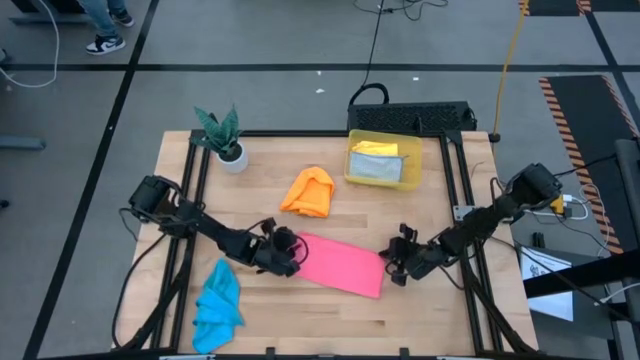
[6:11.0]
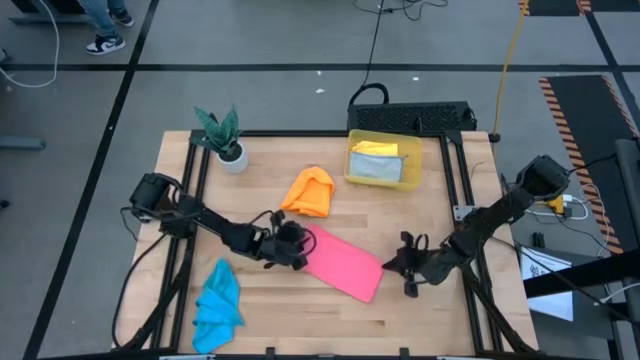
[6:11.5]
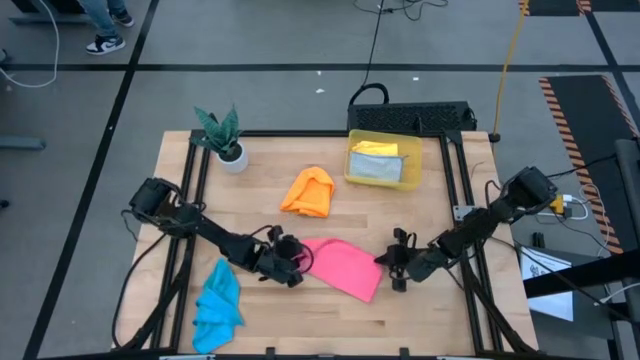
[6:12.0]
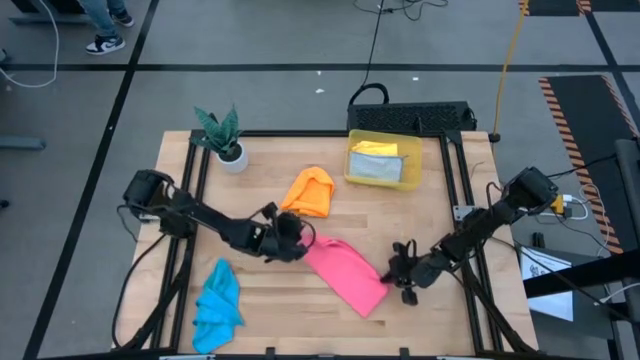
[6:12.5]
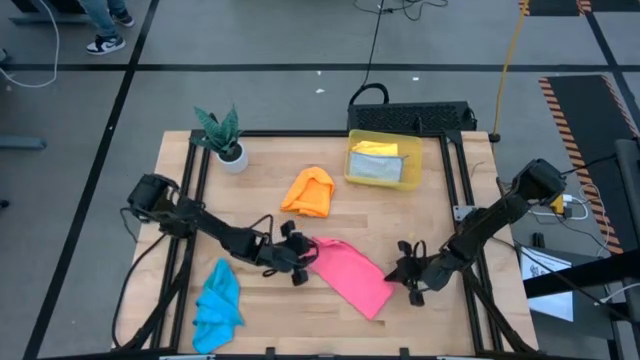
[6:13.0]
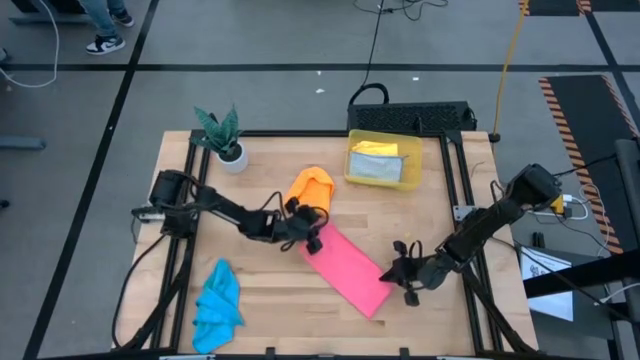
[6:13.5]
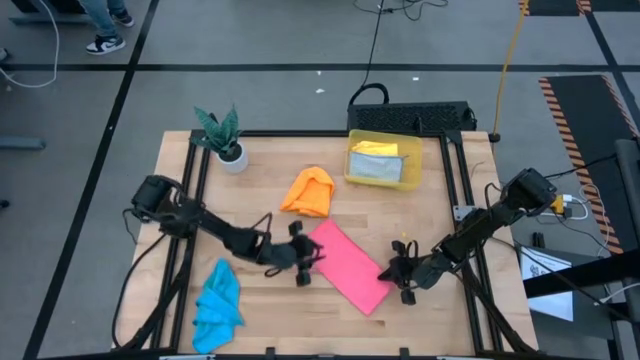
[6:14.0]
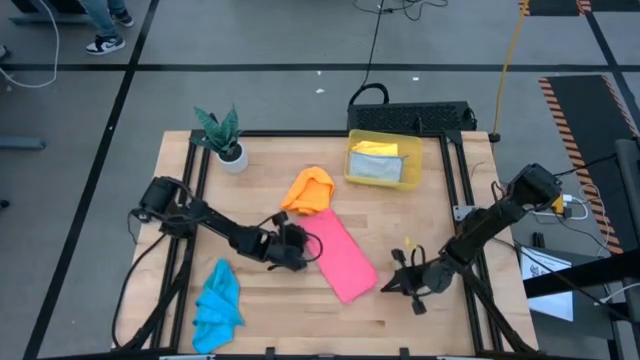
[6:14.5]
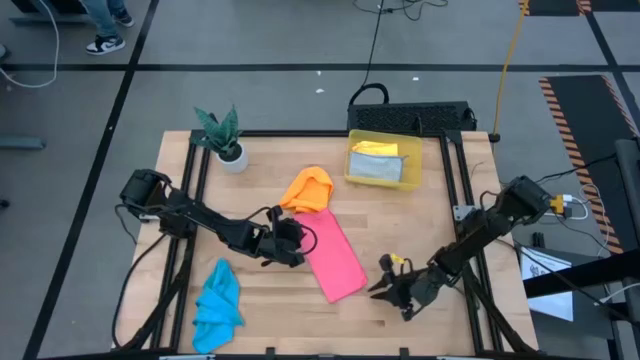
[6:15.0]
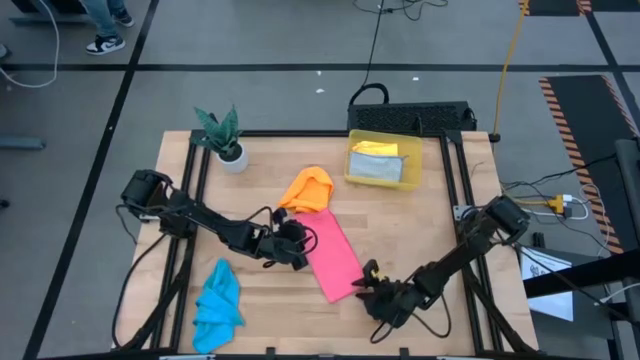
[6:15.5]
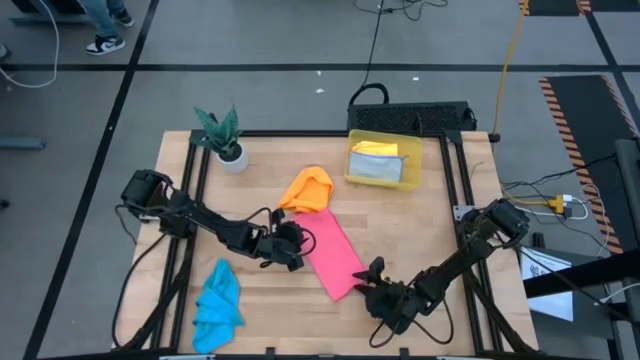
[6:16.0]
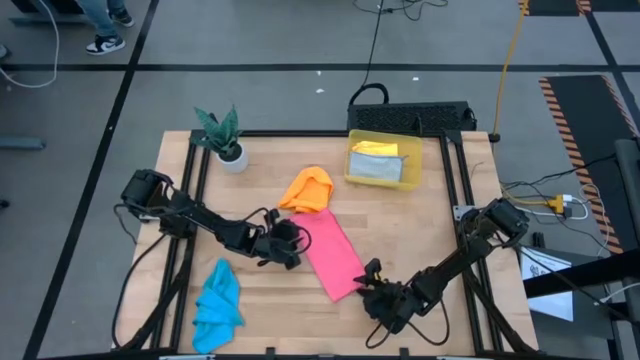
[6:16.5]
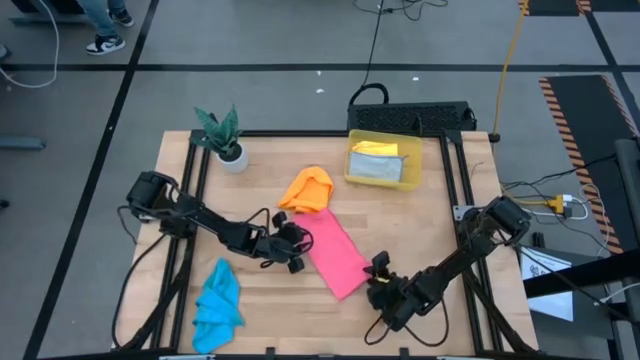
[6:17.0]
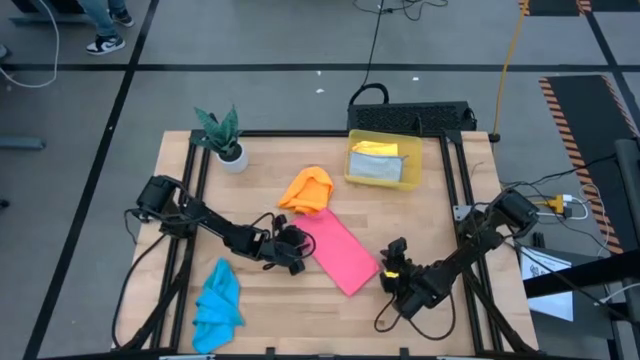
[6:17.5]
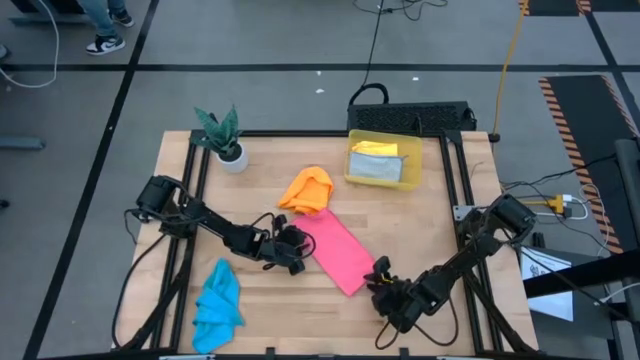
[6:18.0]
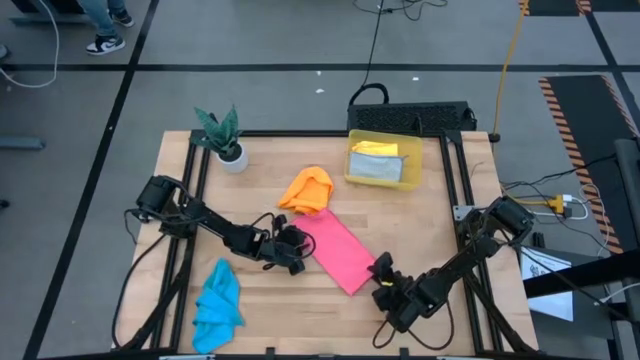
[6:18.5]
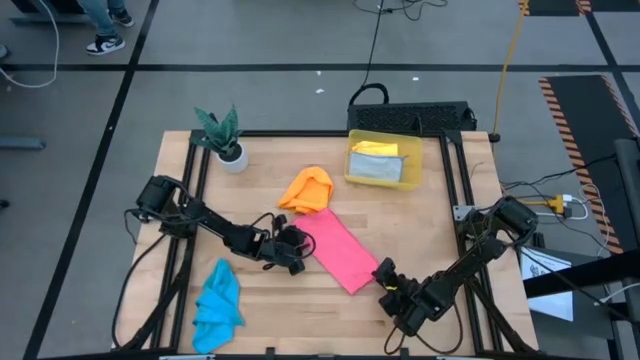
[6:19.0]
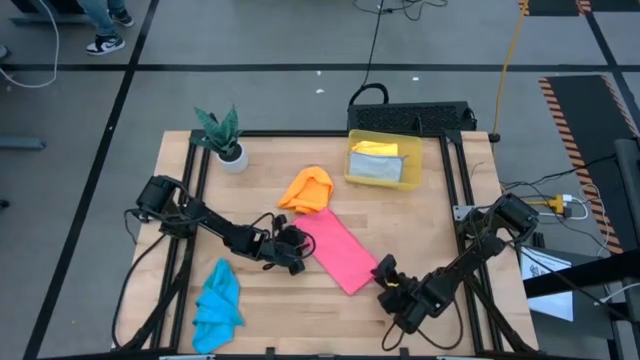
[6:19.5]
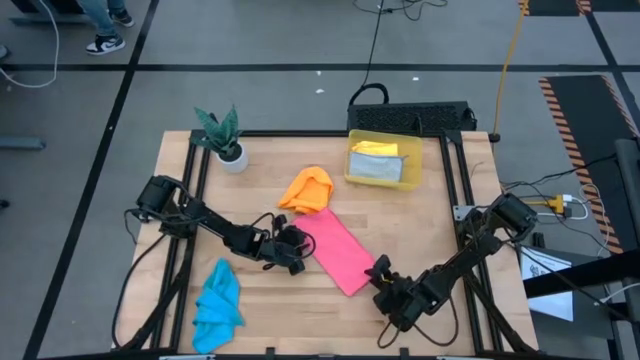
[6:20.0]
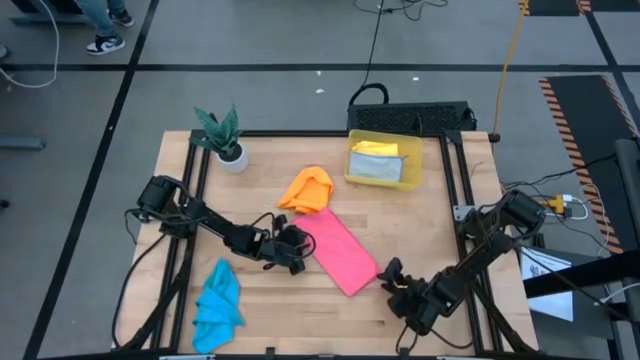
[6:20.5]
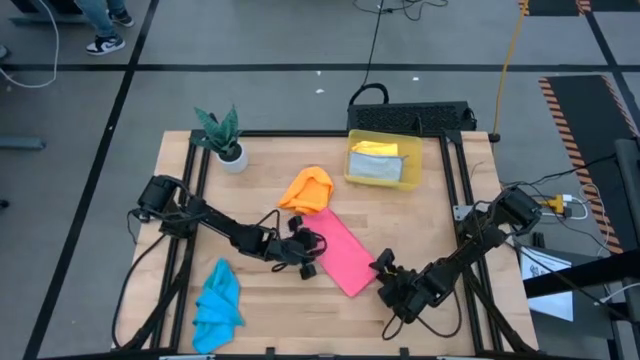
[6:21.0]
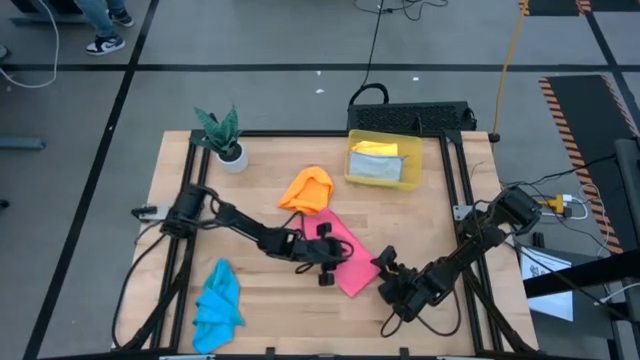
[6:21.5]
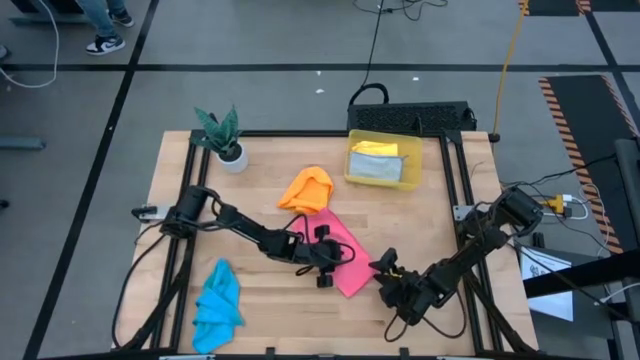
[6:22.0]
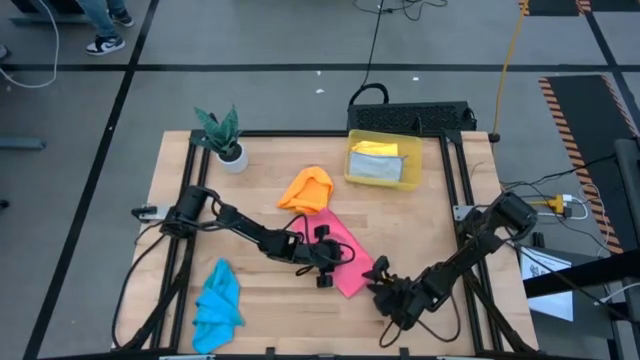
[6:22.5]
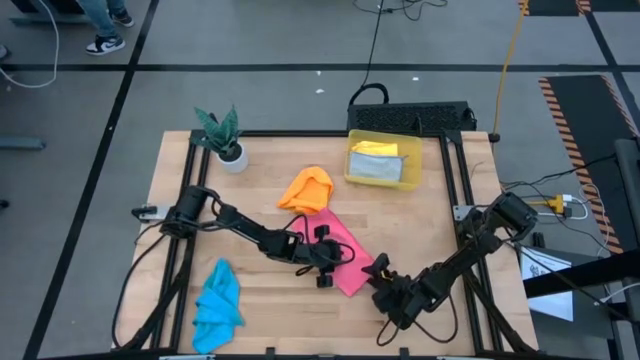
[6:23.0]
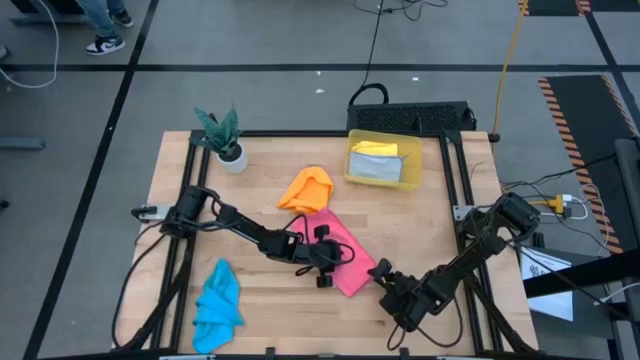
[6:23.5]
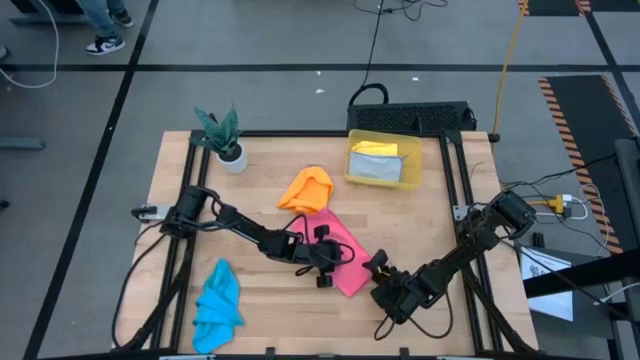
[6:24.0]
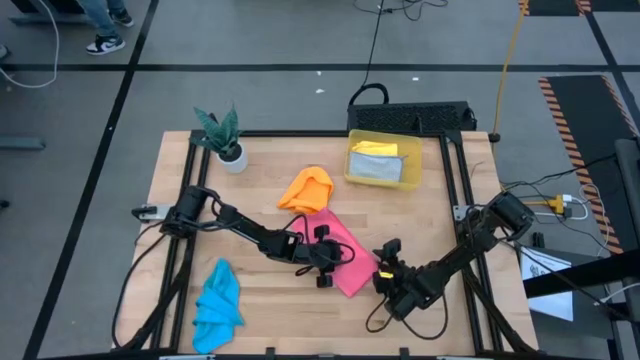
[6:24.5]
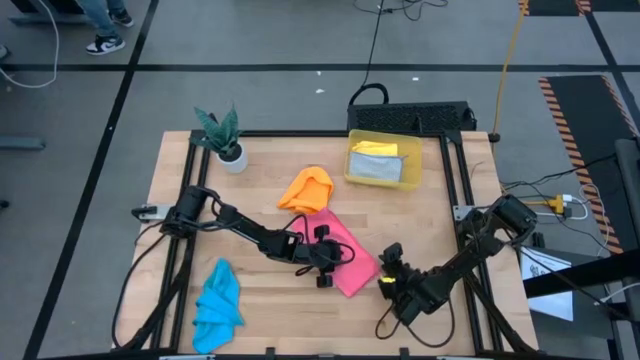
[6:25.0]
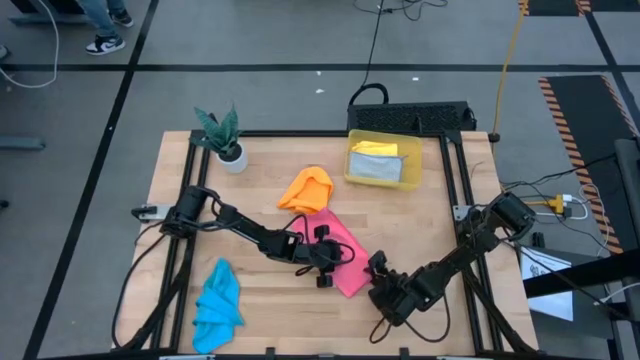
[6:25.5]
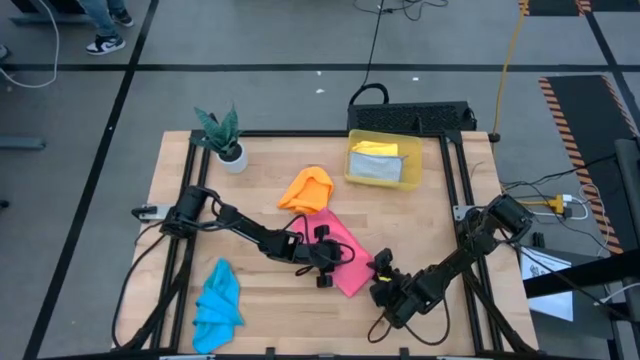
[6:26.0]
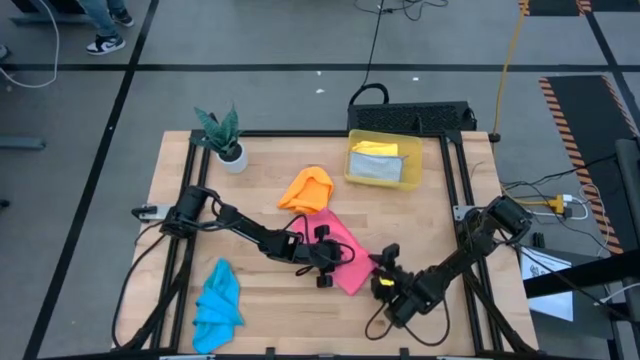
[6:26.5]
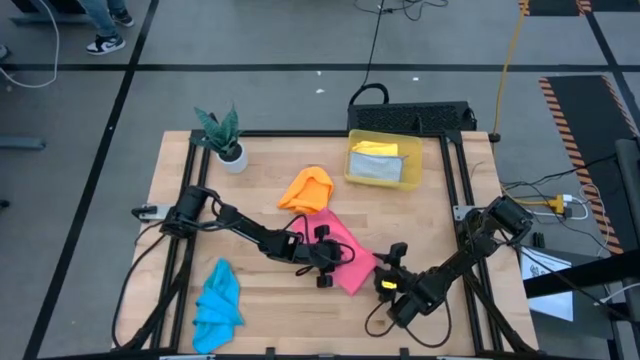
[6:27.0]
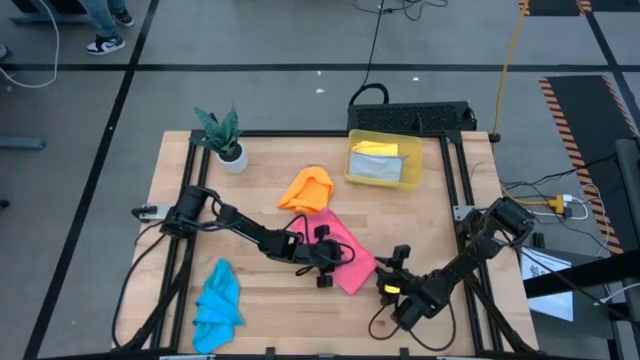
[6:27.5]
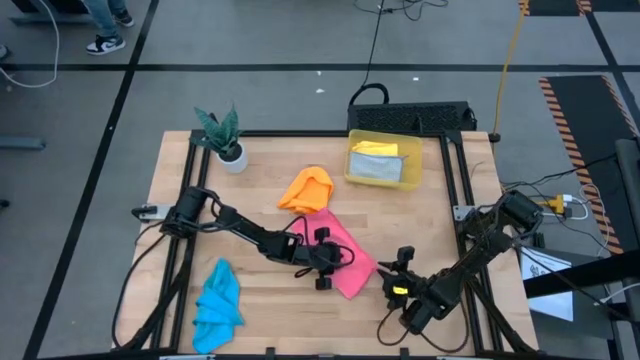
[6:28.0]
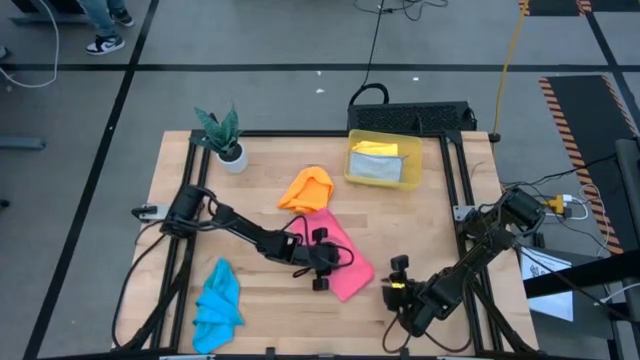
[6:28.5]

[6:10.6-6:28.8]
Task: Fold microfiber towels
Fold the pink kitchen towel
